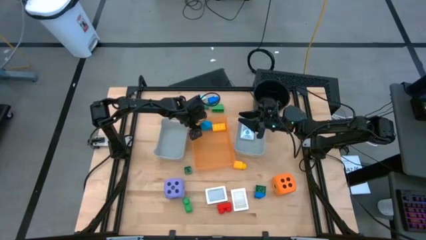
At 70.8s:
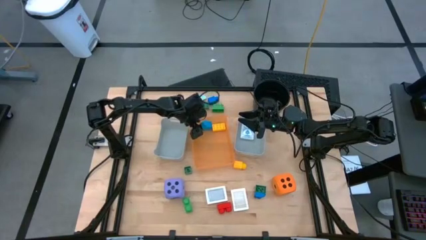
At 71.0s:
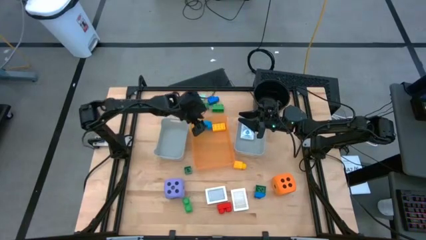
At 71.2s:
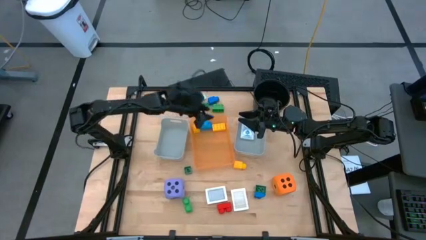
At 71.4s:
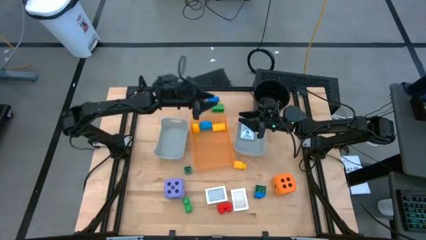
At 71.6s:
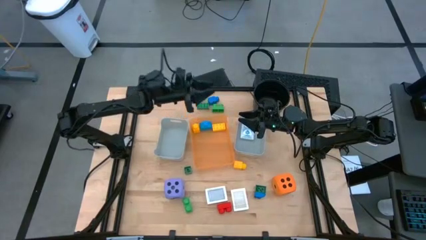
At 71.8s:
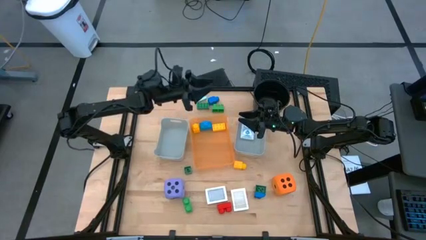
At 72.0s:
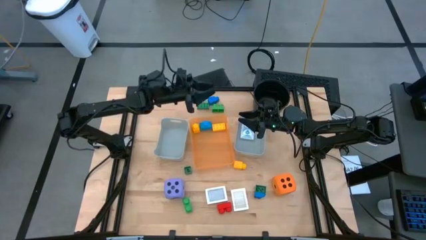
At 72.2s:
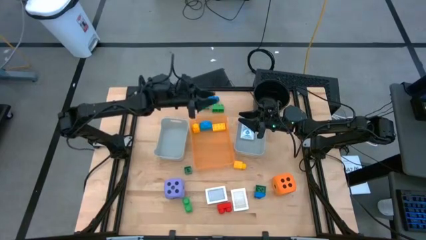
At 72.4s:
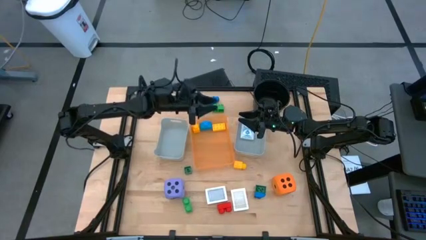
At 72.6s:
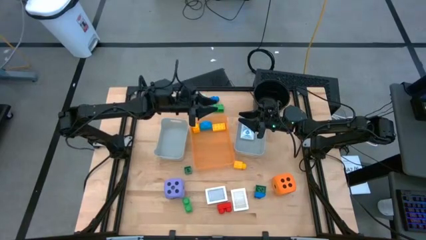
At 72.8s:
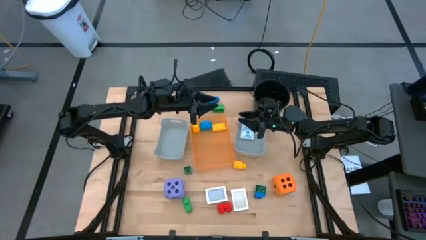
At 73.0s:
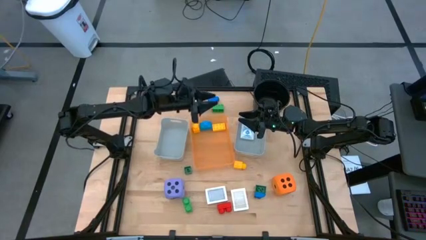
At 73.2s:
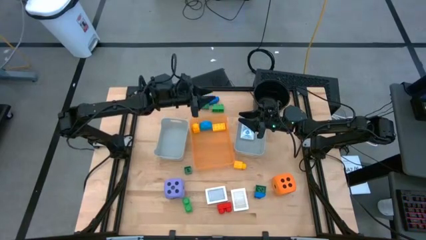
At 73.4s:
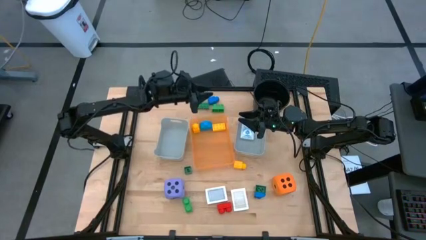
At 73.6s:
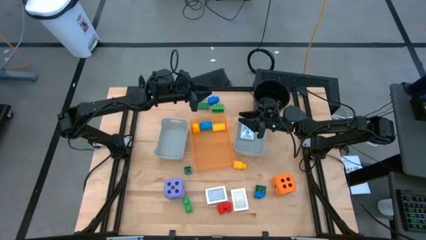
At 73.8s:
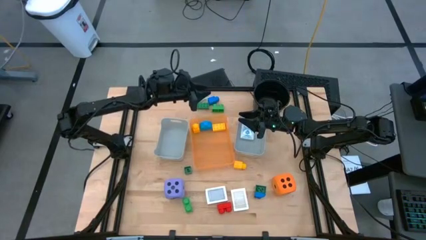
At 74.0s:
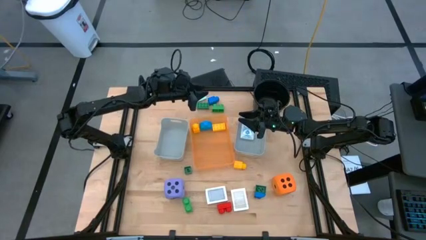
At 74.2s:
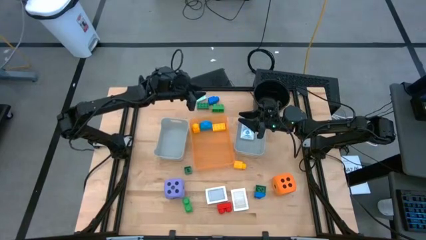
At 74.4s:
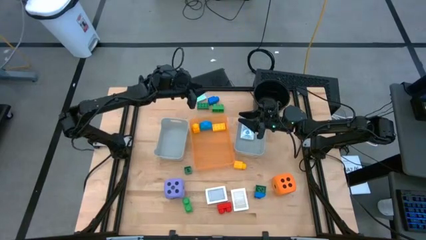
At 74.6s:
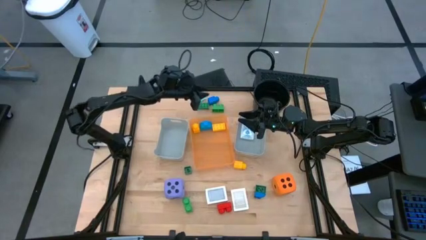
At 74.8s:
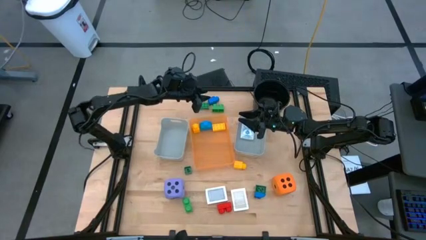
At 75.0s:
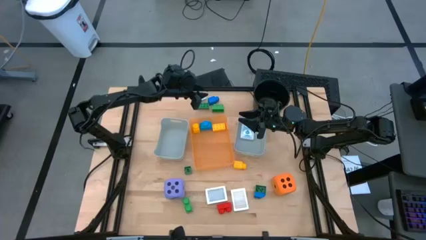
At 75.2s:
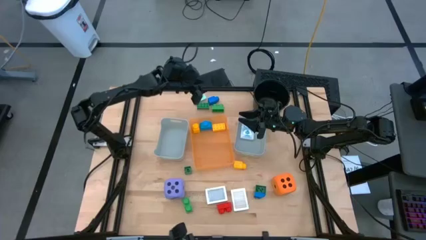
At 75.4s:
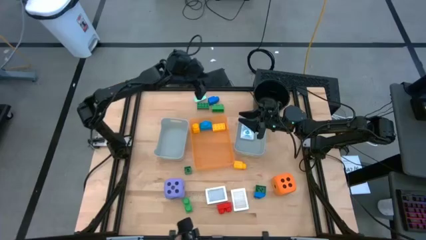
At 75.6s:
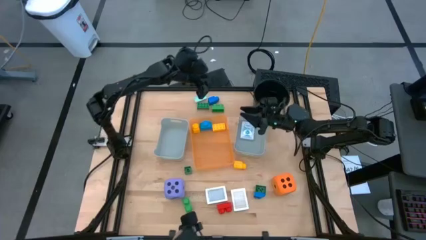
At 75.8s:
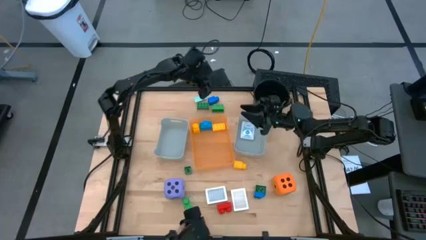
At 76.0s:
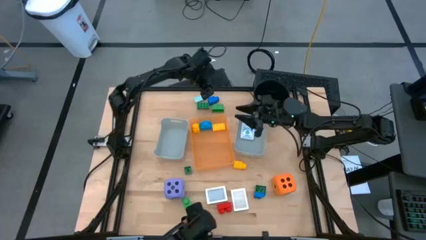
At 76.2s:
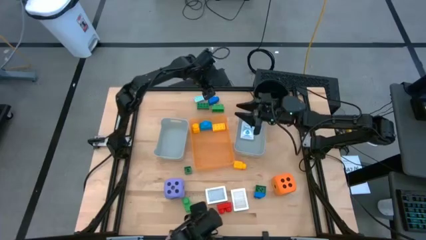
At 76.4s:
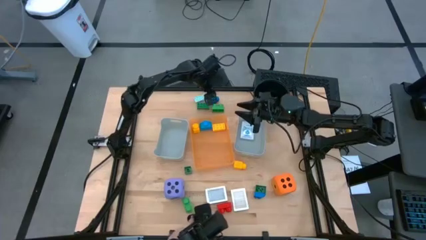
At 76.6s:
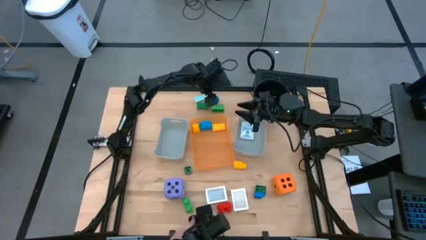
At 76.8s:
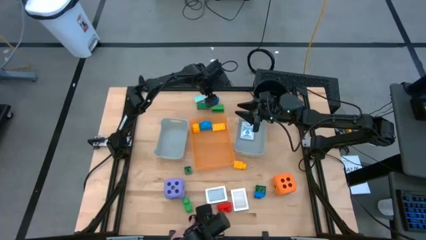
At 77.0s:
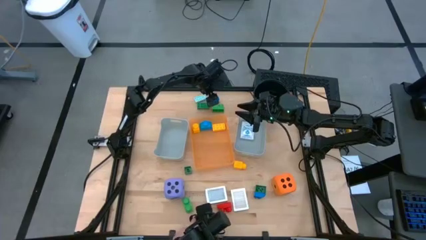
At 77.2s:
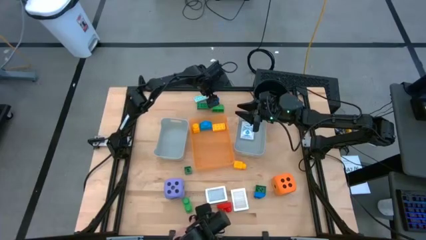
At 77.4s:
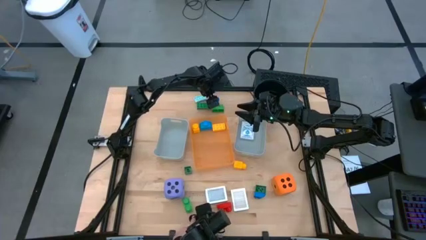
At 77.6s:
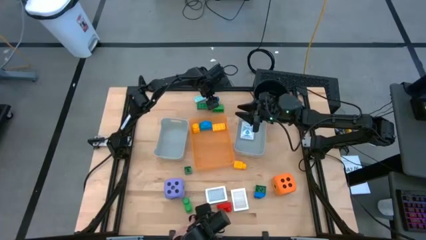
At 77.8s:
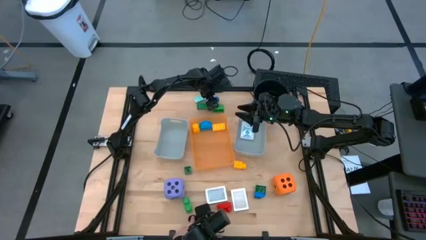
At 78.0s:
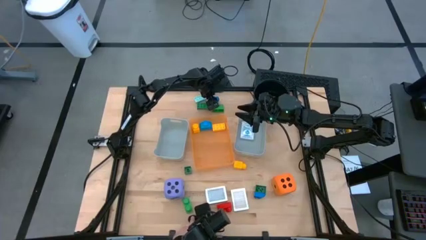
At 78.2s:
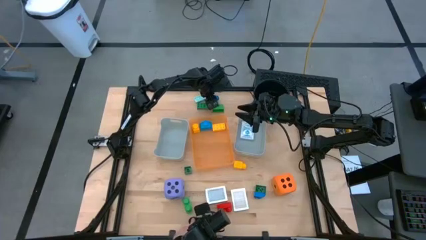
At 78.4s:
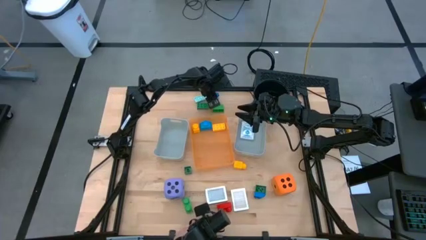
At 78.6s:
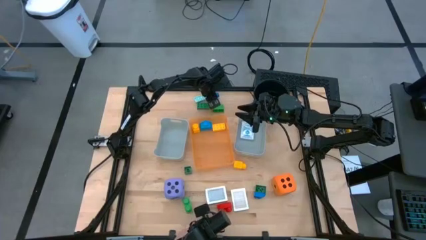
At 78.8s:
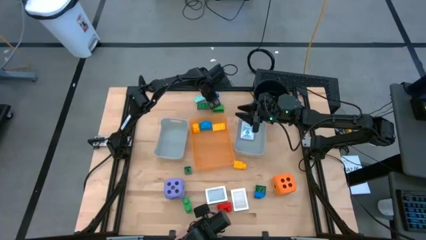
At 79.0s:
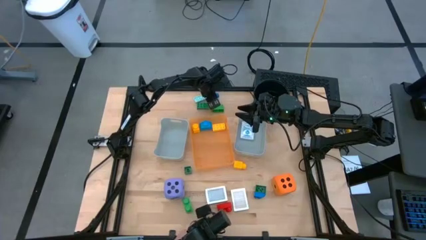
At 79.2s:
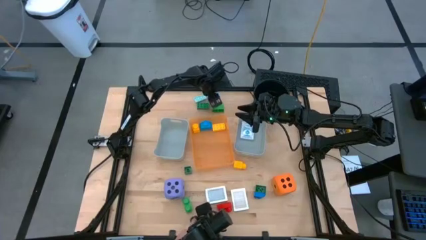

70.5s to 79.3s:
Task: Pick & Place Toys
Put the blue game piece block into the orange bin

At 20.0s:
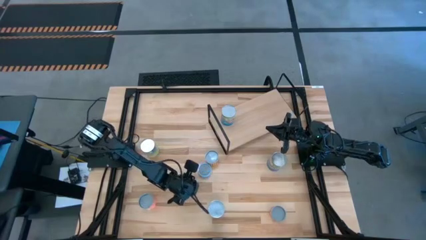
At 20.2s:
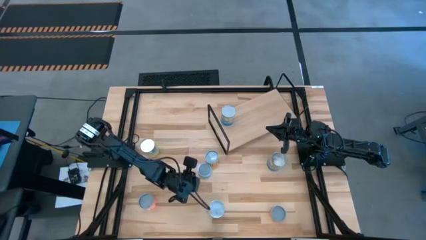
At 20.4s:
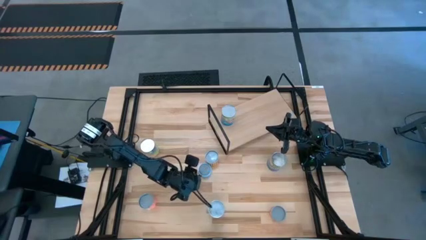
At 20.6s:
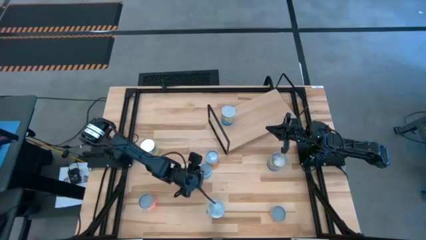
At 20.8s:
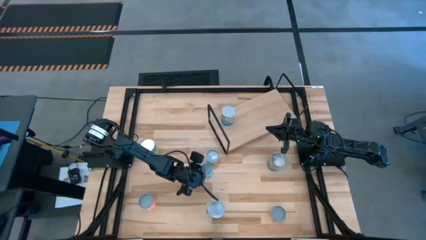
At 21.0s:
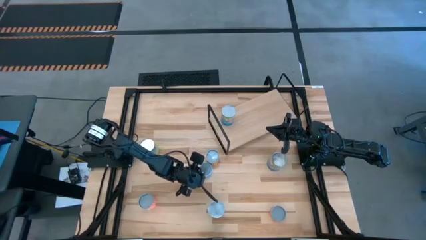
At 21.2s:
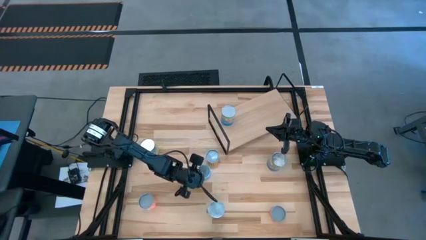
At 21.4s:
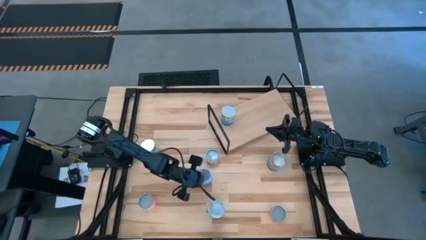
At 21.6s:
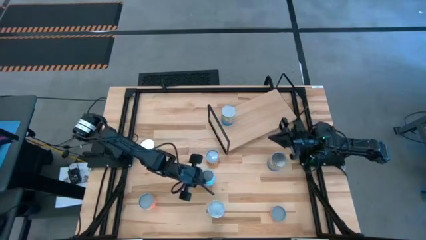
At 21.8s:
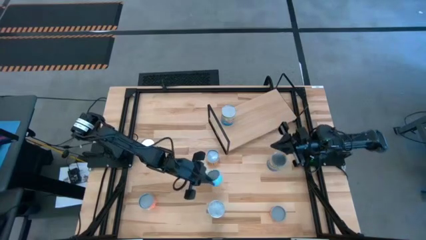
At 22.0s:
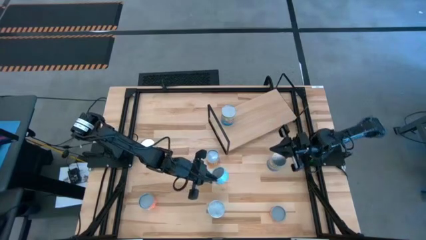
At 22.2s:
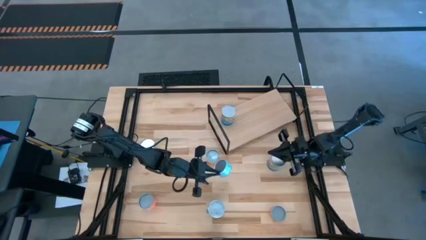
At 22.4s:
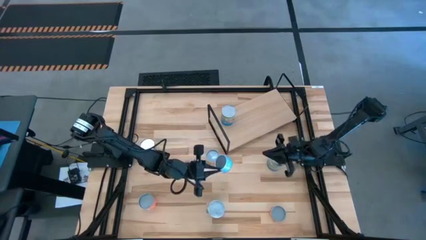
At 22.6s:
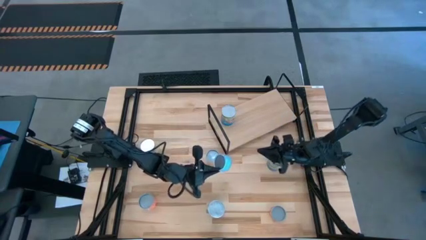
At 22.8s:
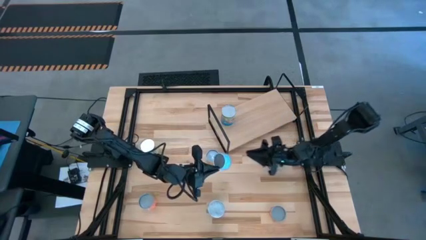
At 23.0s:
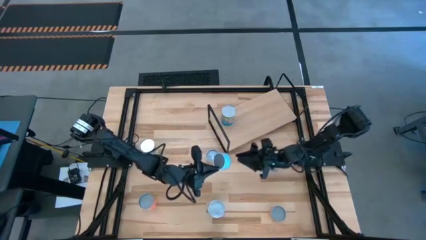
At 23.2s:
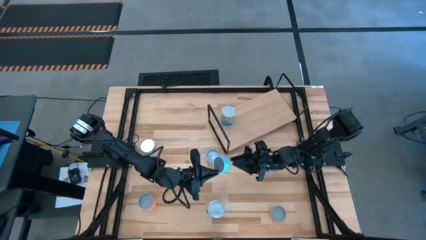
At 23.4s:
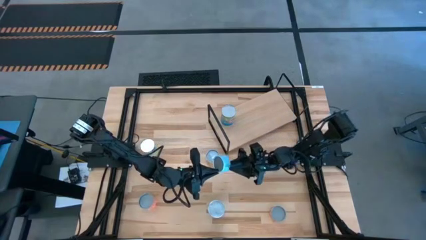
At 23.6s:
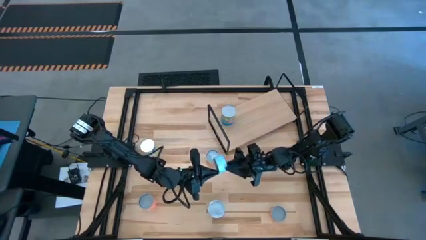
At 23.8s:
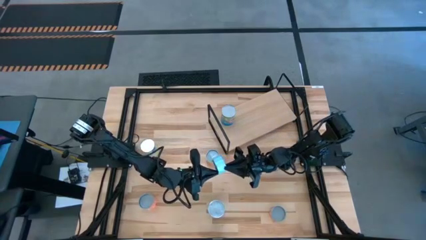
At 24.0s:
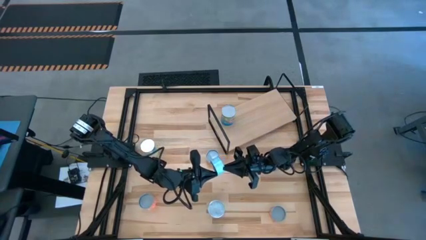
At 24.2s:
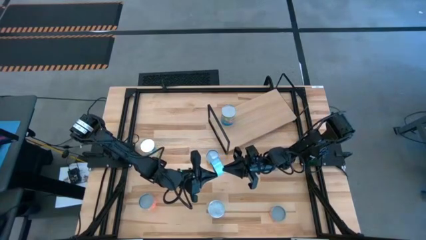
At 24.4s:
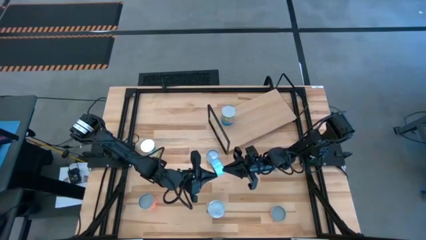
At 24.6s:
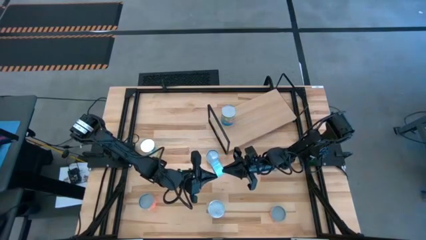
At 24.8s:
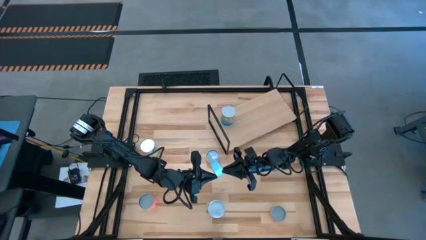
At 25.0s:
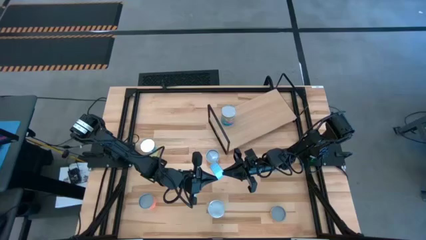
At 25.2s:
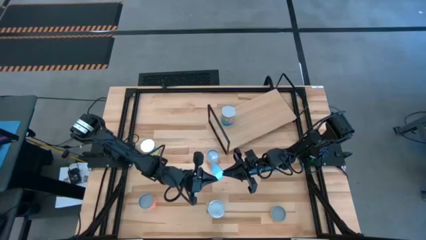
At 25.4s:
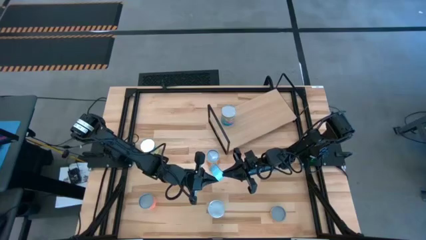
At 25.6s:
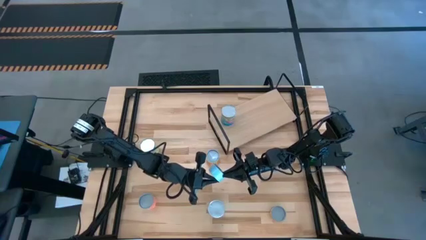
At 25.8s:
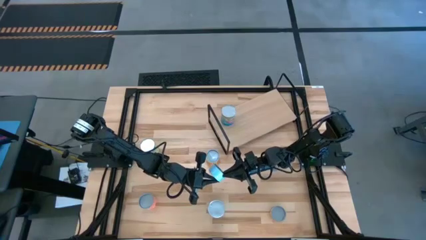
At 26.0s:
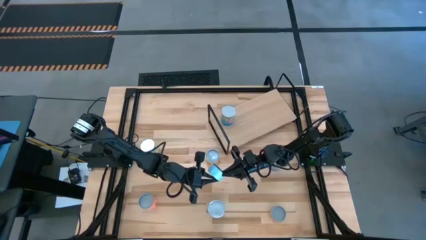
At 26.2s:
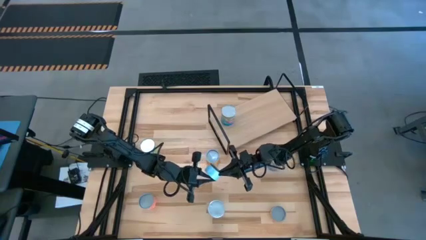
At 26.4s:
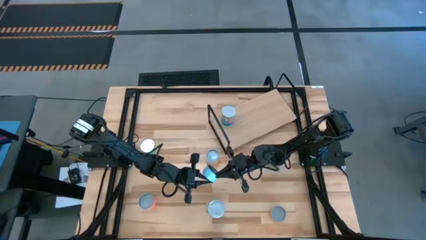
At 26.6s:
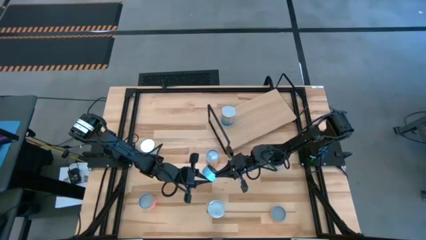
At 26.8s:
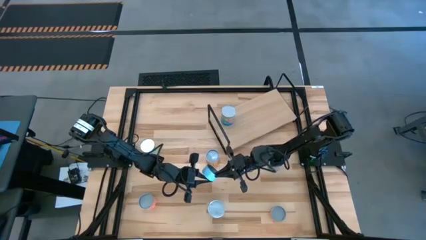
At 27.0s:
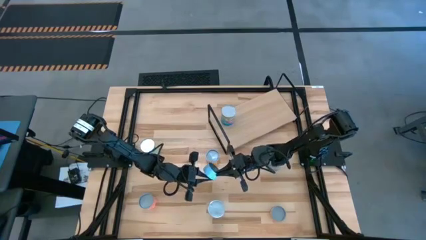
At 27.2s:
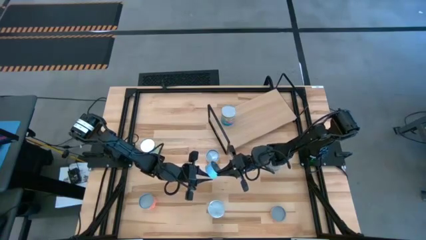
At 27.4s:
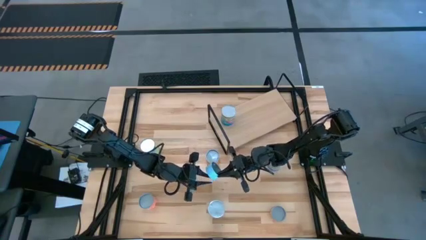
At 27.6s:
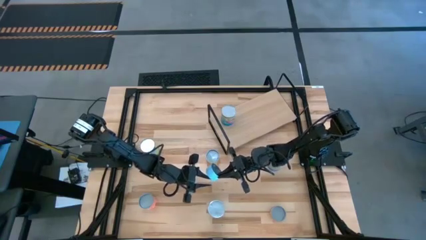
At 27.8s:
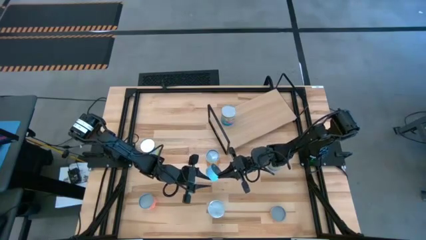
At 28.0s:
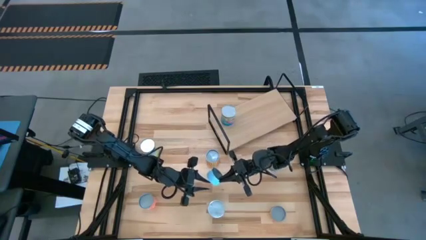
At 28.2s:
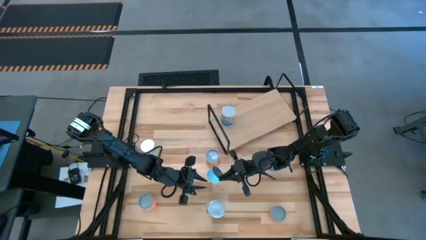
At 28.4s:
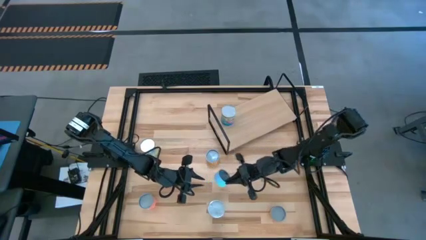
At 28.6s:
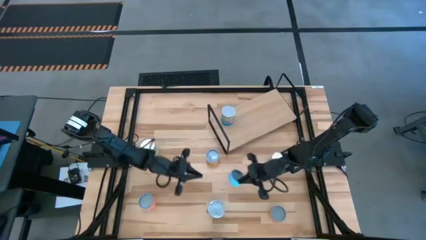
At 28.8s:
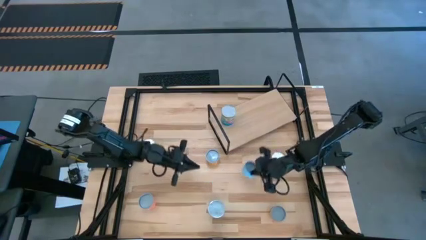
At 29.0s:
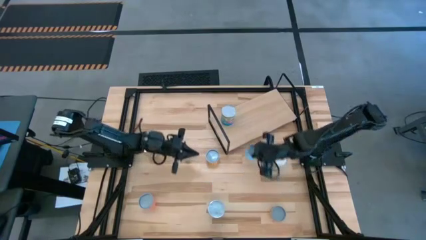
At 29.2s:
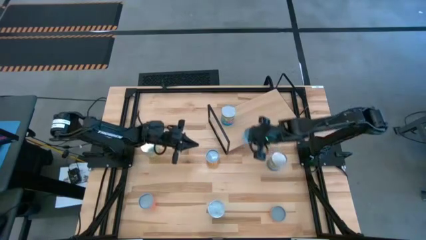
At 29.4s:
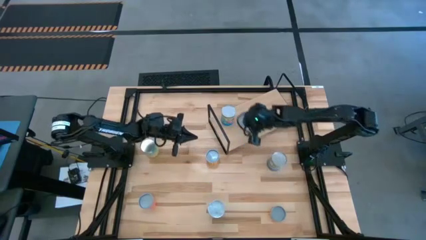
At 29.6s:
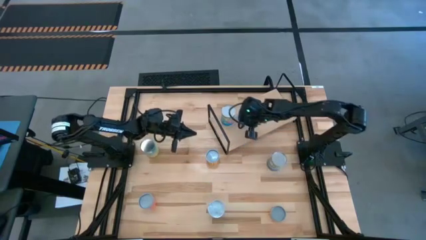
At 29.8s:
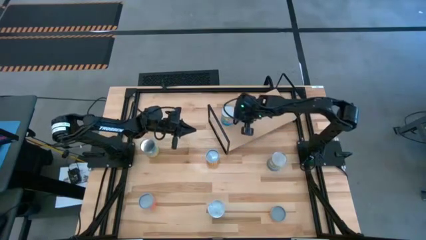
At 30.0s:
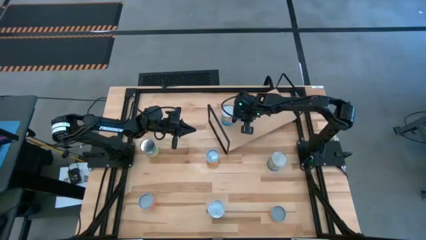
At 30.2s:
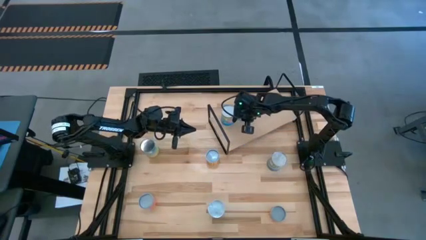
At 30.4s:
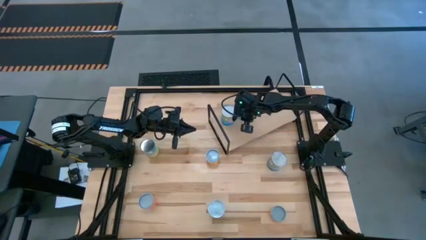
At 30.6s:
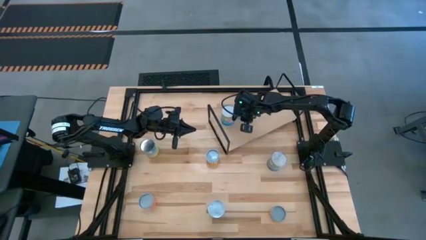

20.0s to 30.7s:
Task: Pick and place cans onto a shelf
Put the canned salmon onto the shelf
